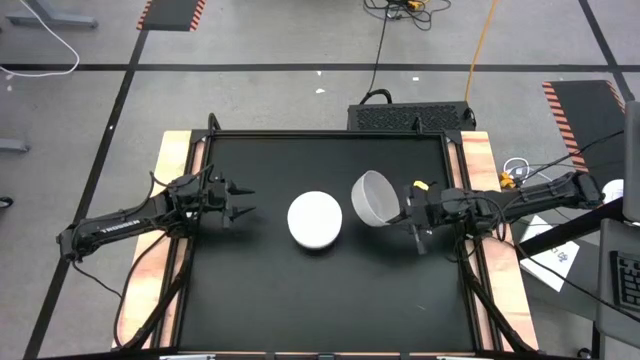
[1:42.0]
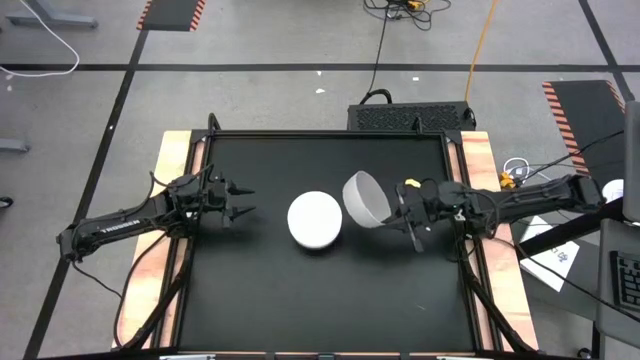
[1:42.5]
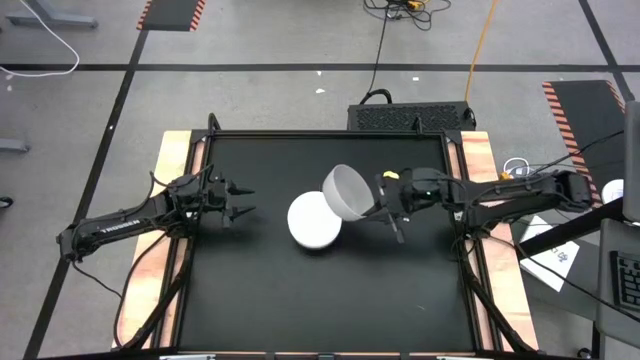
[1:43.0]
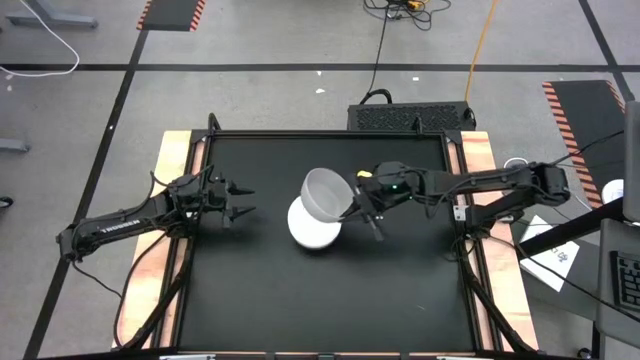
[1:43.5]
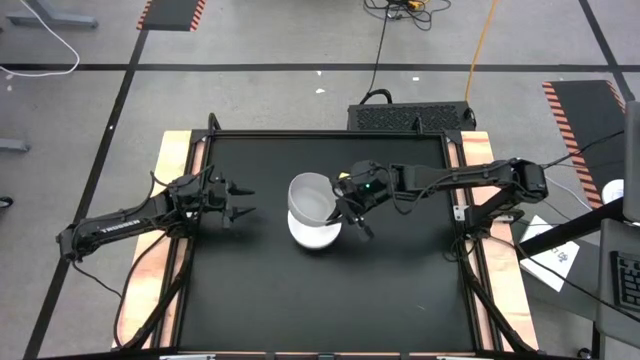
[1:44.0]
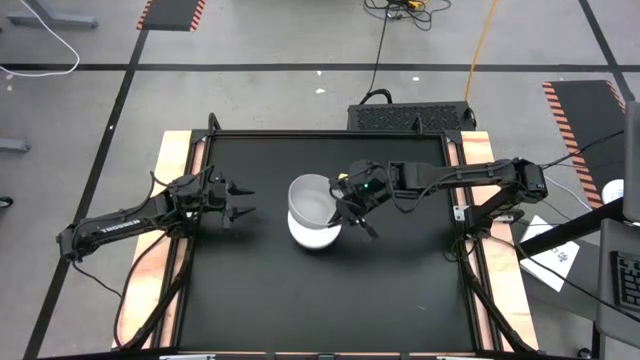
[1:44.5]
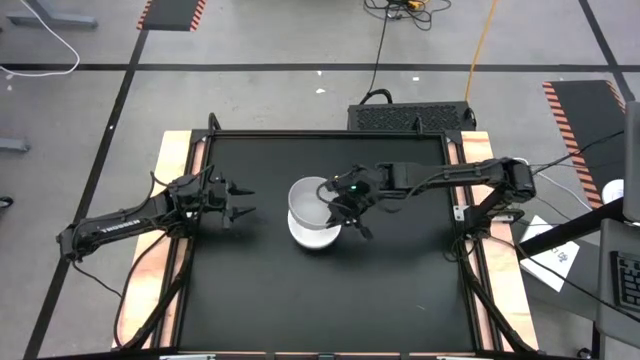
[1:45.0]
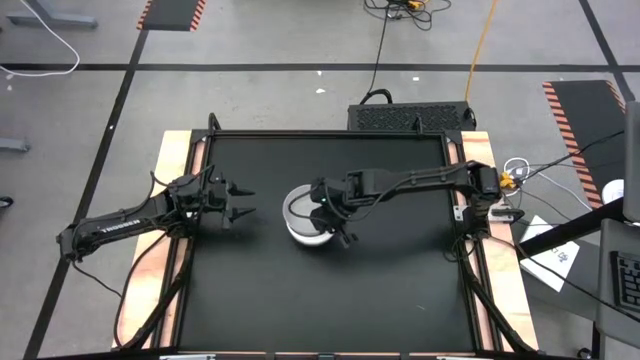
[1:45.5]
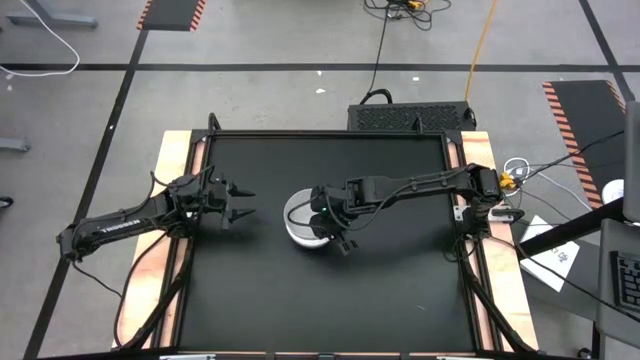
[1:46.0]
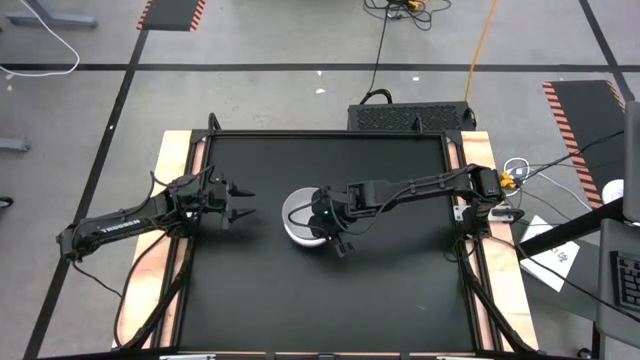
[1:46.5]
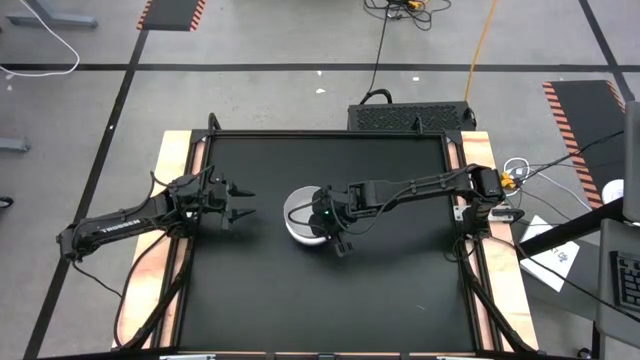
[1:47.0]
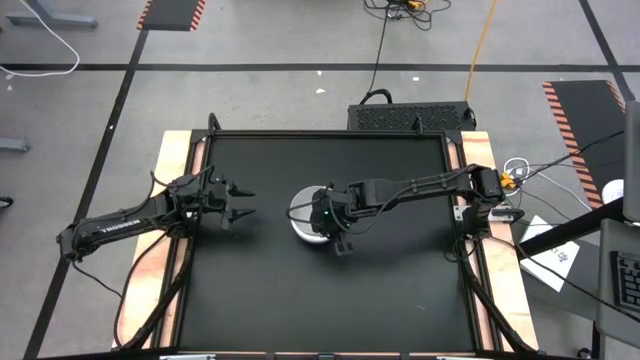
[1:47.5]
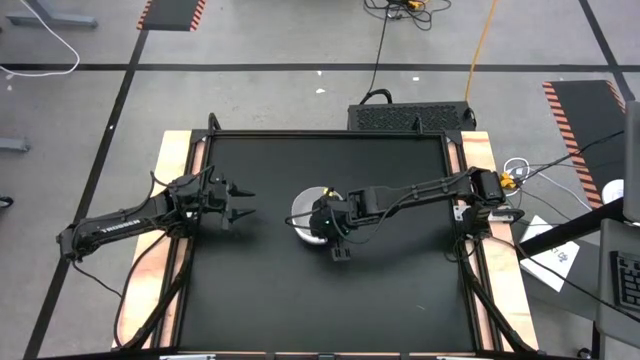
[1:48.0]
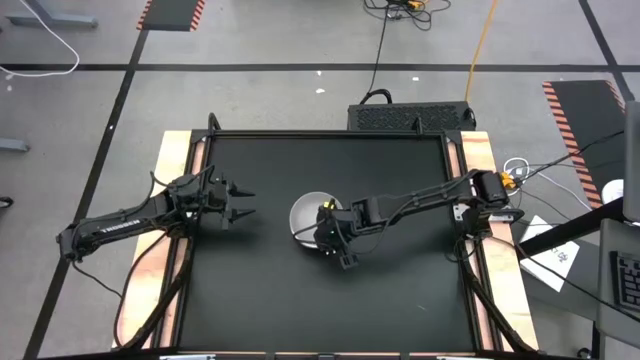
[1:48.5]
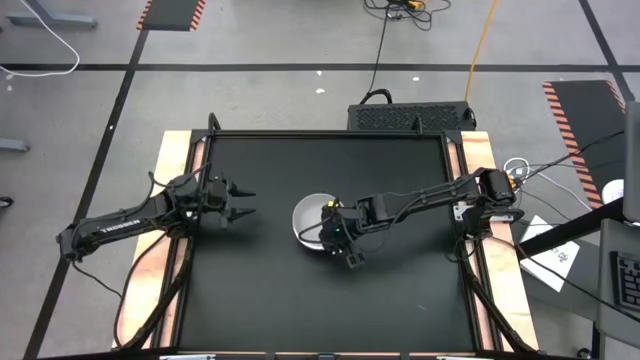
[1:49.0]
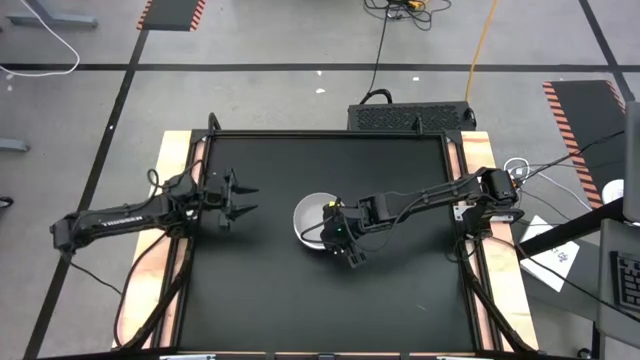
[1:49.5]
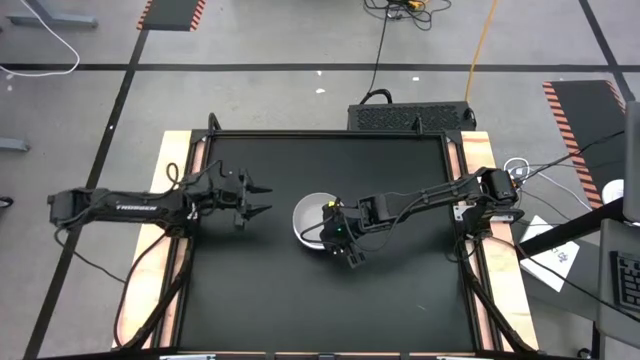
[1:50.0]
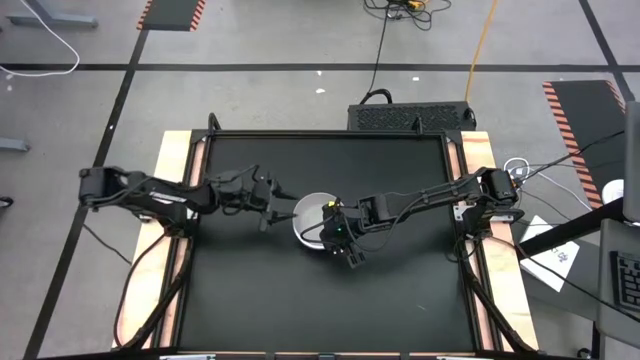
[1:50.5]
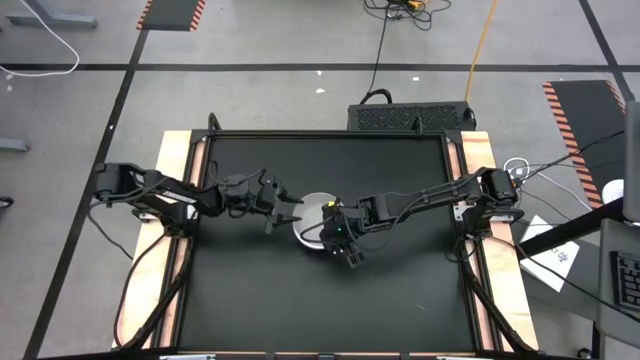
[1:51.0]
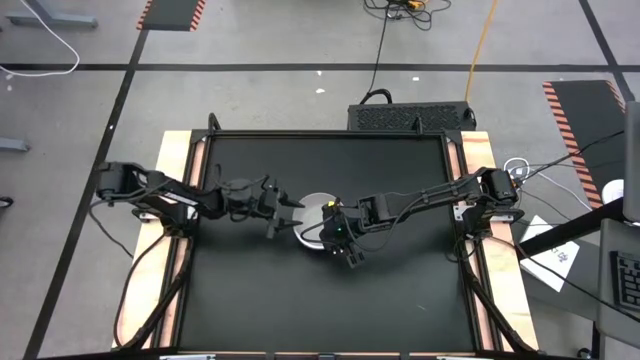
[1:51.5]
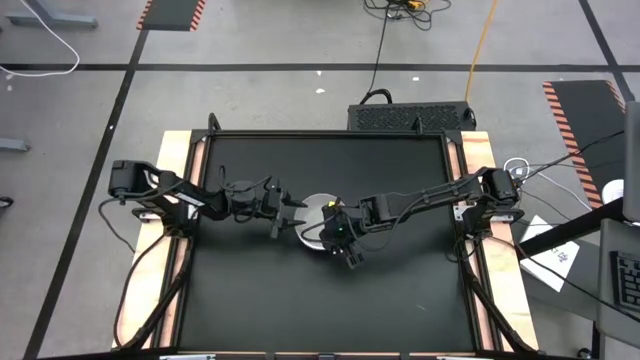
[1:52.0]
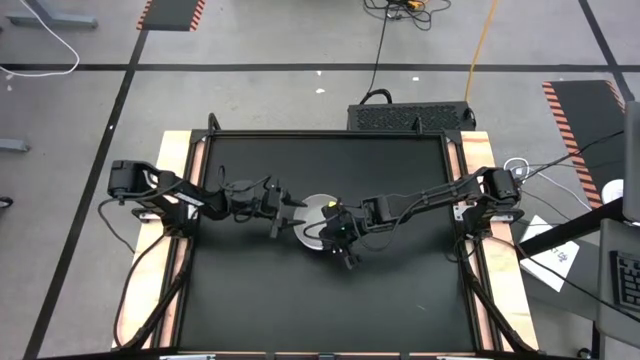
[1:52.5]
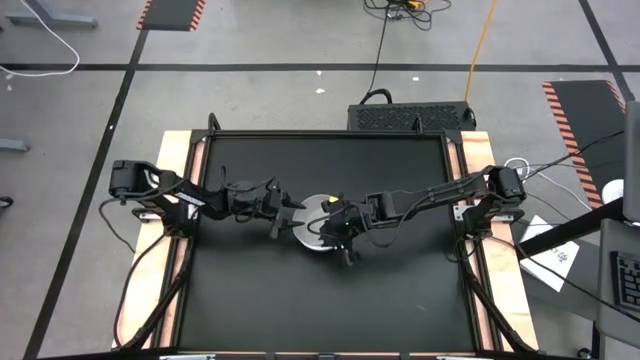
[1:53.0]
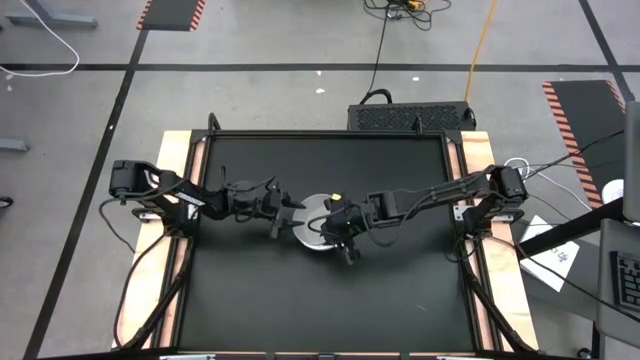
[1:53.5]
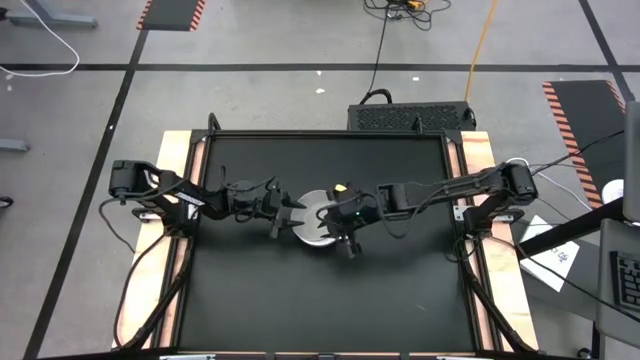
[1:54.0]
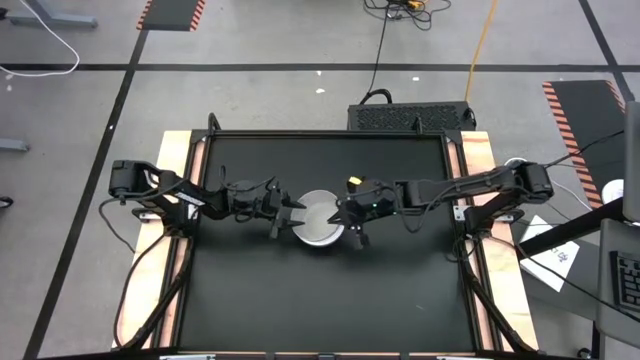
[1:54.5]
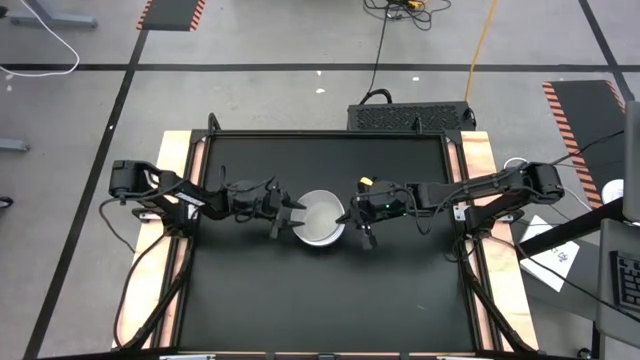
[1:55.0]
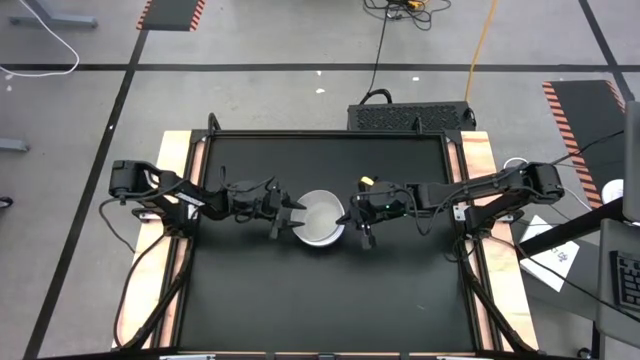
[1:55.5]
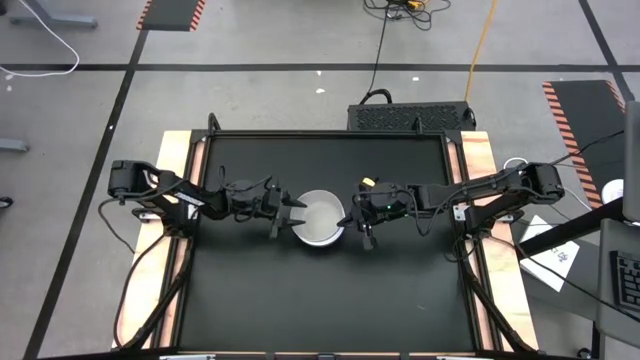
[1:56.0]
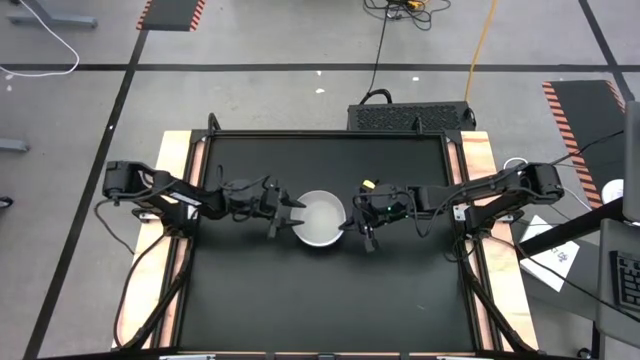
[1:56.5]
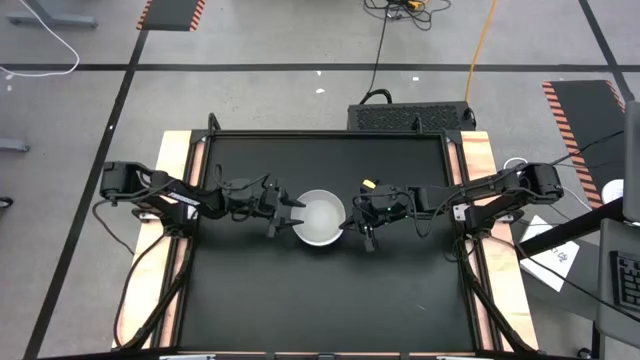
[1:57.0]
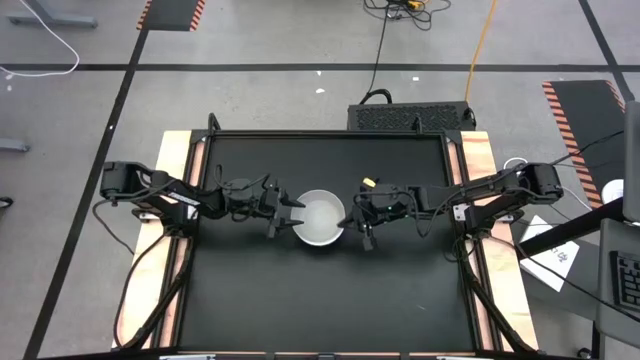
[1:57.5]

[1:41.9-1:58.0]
Task: Nest bowls inside each other
Stack the light gray bowl on the white bowl

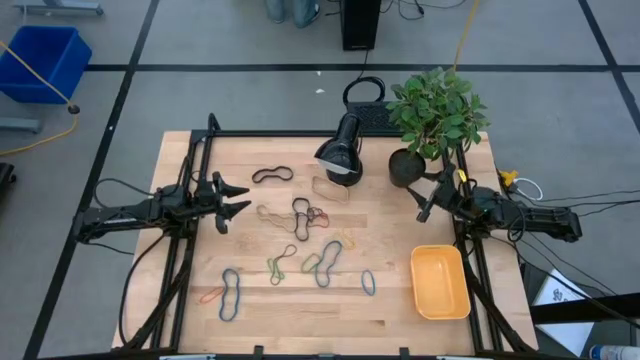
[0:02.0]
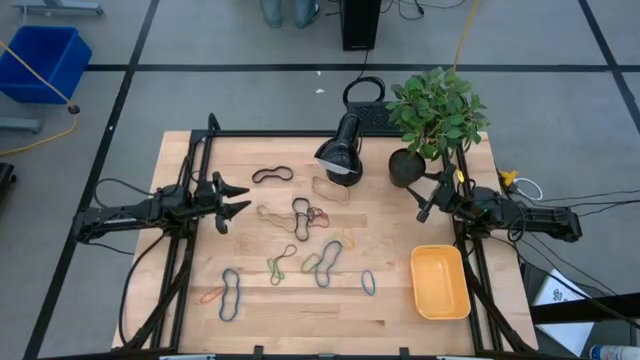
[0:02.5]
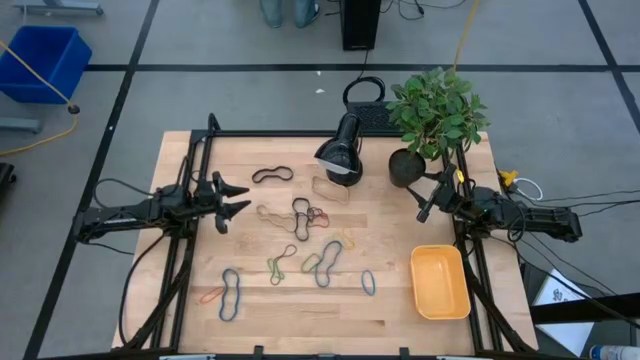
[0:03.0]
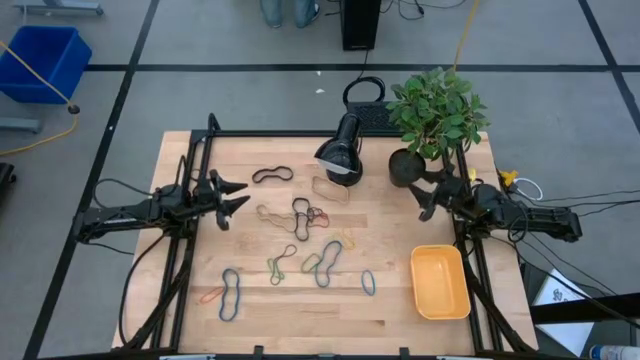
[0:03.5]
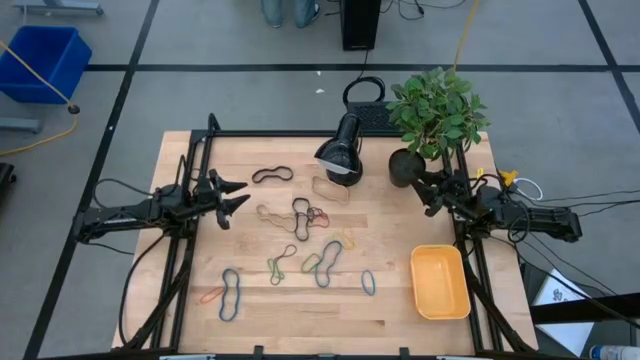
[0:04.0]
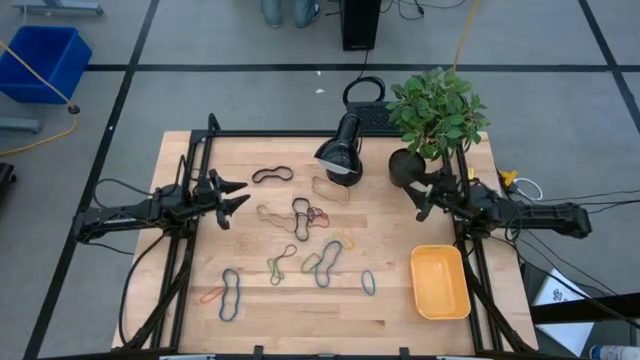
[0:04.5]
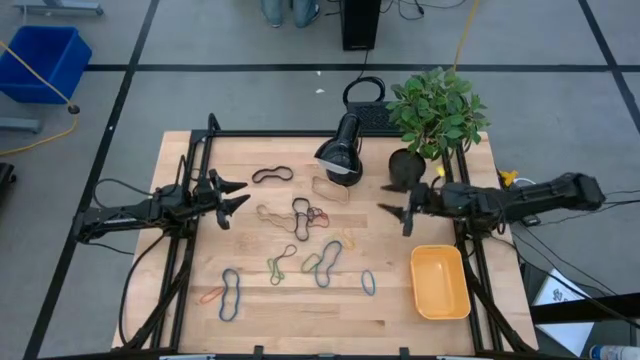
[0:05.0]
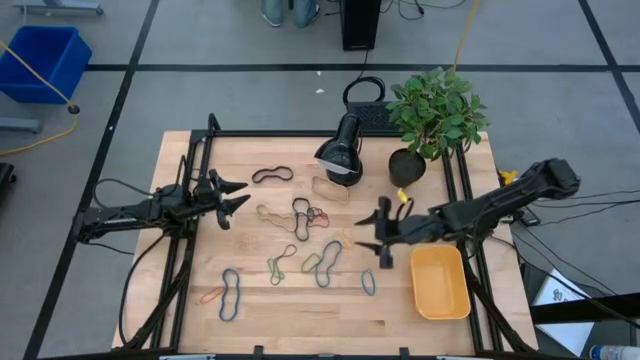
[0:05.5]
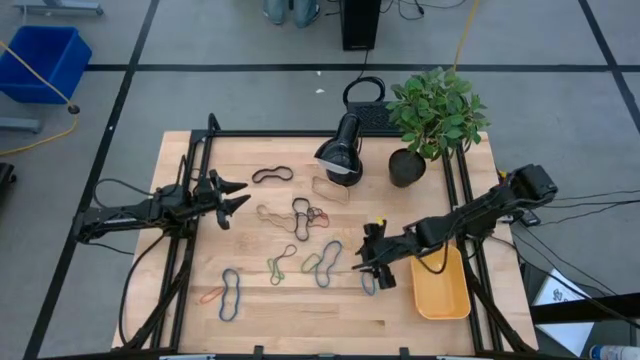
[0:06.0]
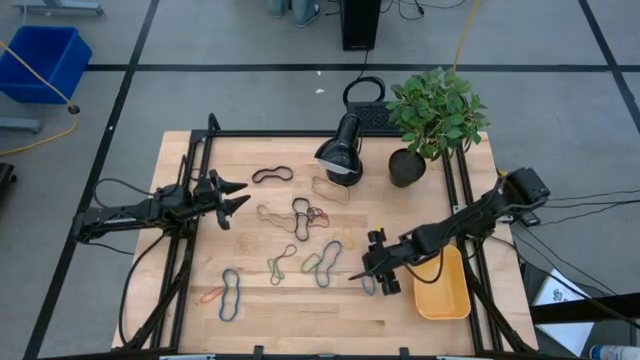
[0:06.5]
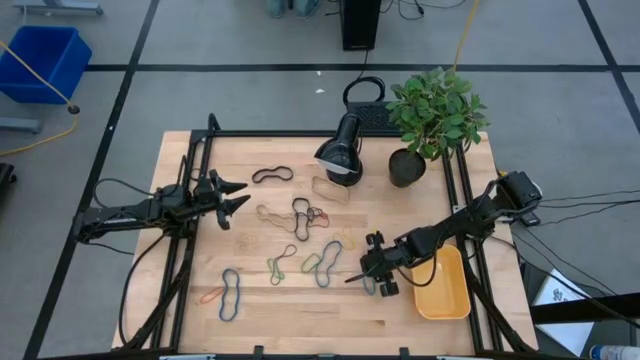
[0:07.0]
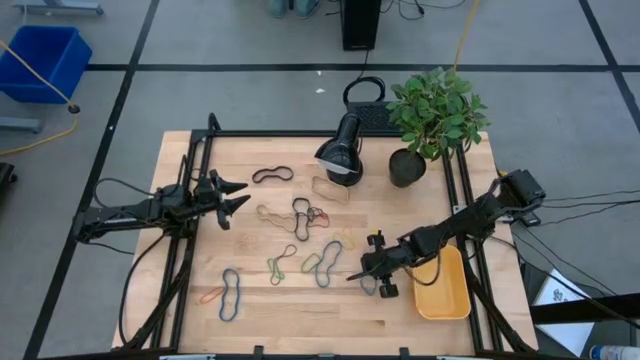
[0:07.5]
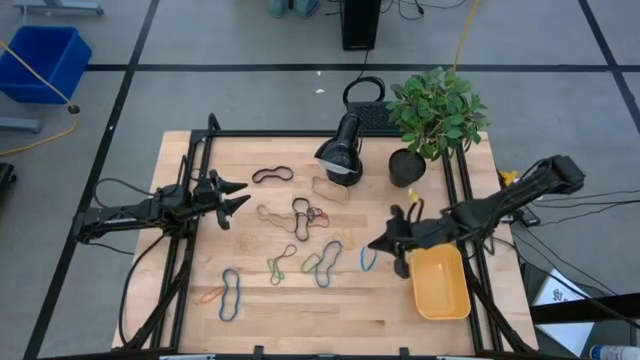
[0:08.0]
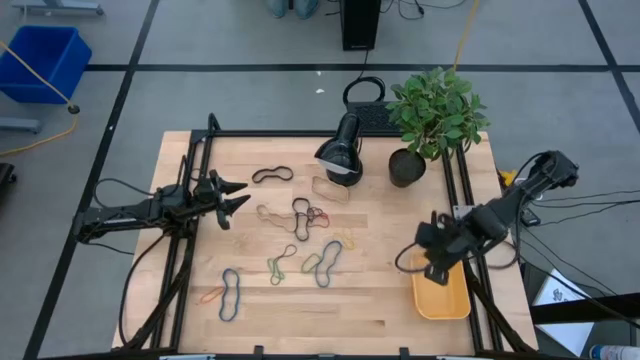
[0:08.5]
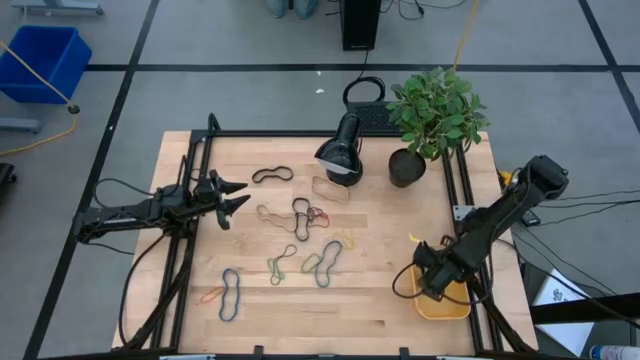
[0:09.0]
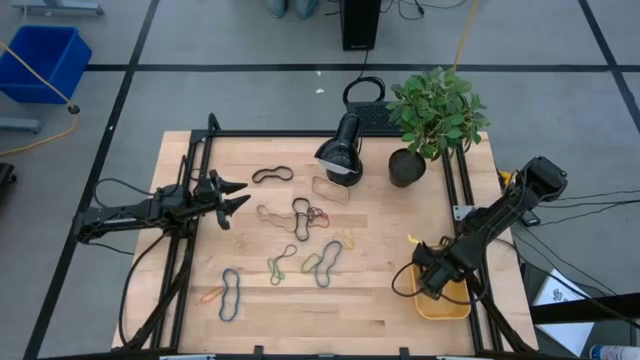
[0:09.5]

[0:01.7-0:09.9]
Task: Pick and place rubber bands into bin
Put the light blue rubber band into the yellow bin
